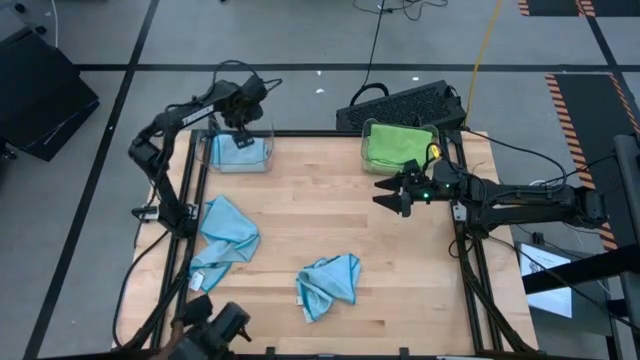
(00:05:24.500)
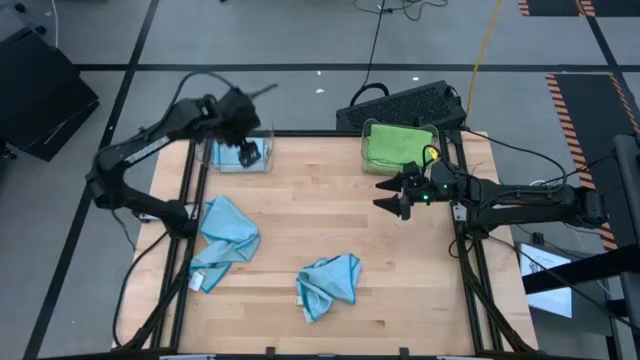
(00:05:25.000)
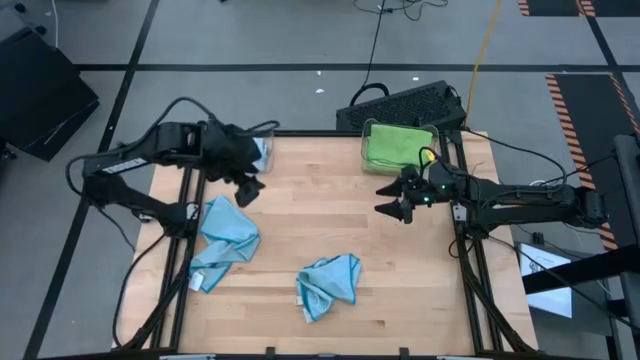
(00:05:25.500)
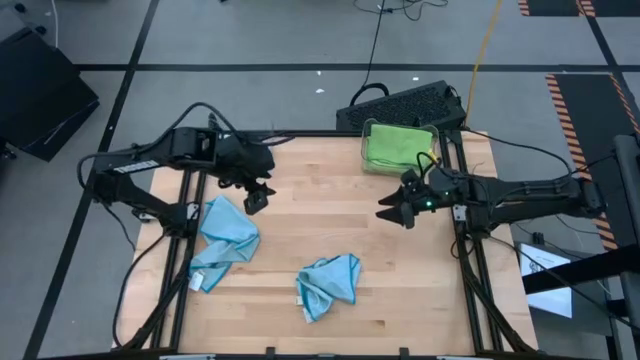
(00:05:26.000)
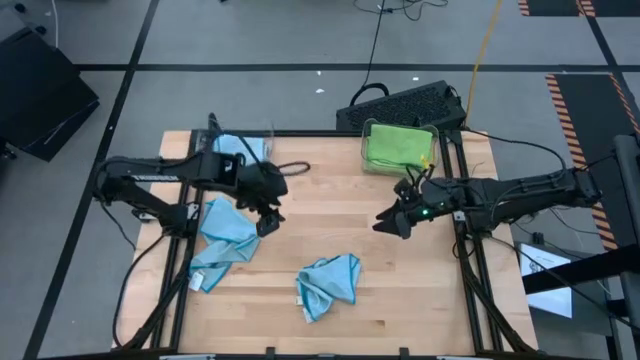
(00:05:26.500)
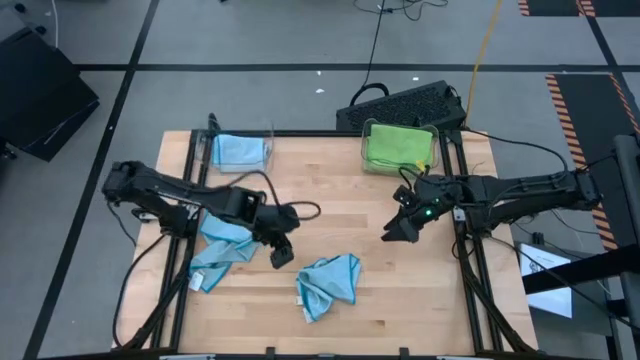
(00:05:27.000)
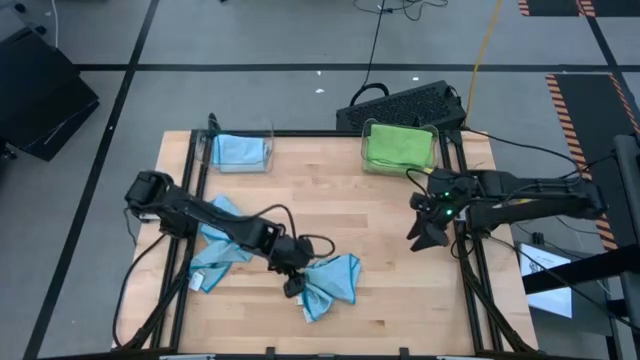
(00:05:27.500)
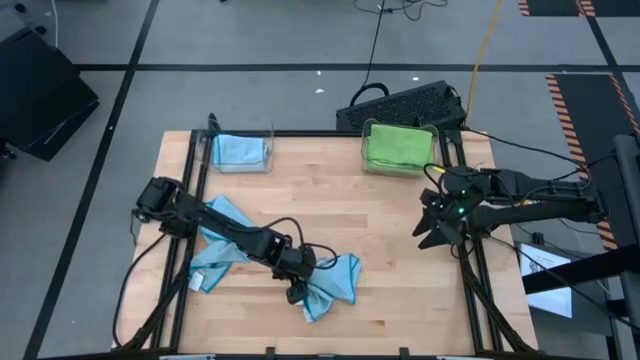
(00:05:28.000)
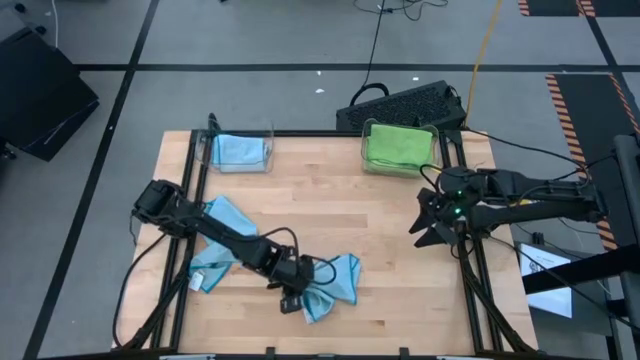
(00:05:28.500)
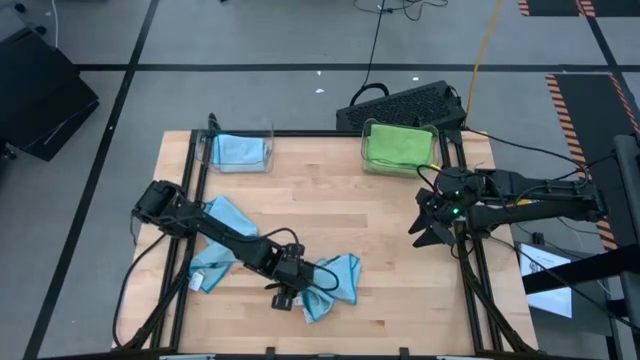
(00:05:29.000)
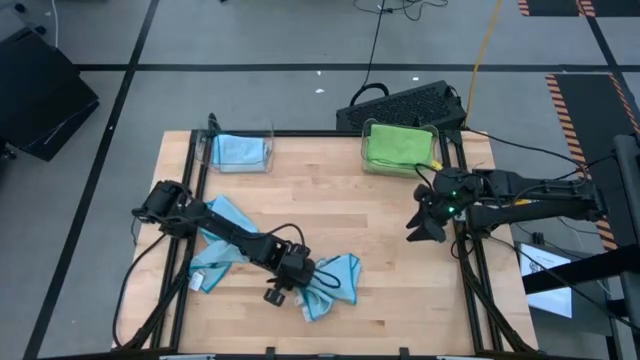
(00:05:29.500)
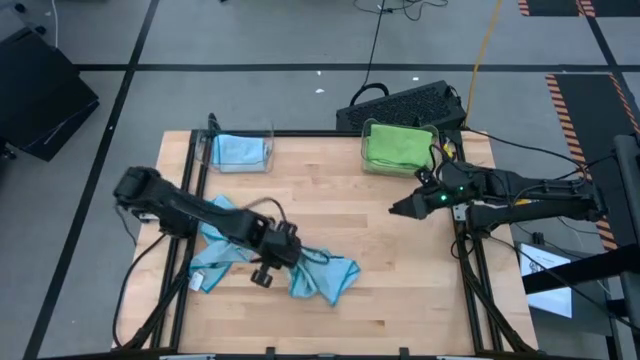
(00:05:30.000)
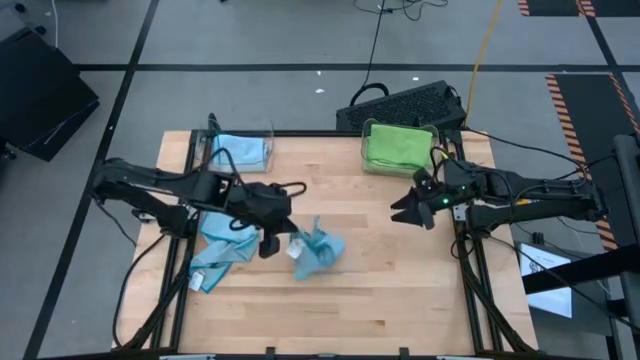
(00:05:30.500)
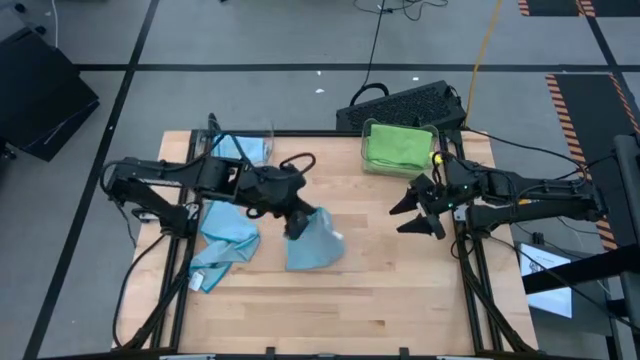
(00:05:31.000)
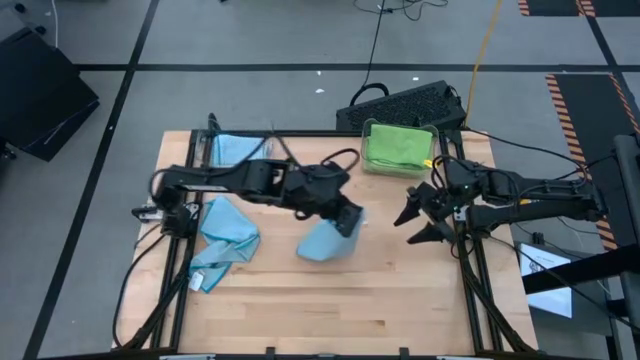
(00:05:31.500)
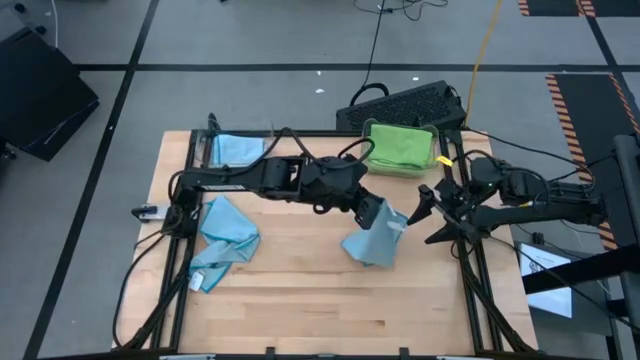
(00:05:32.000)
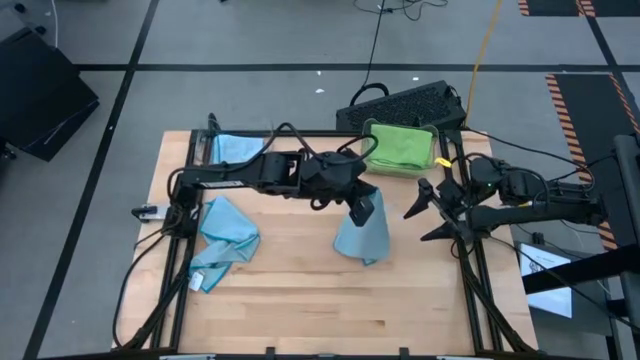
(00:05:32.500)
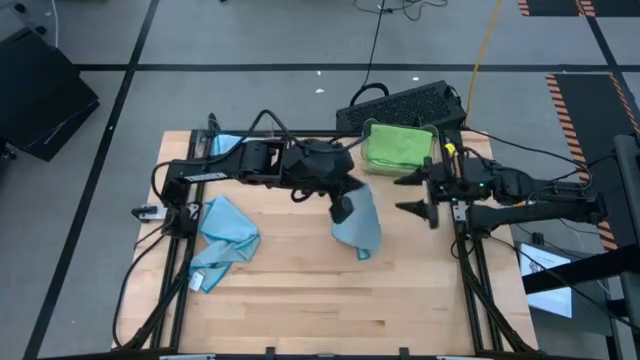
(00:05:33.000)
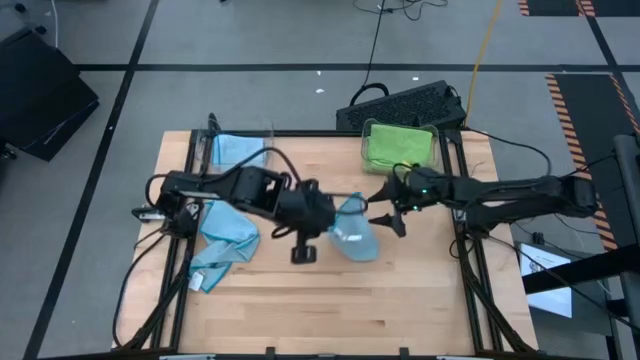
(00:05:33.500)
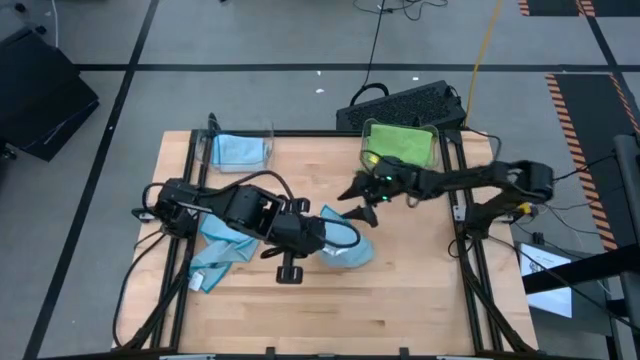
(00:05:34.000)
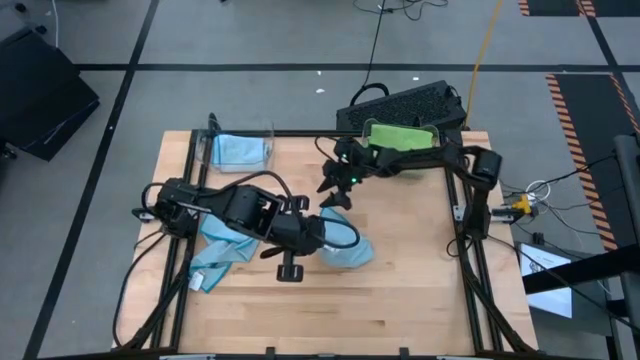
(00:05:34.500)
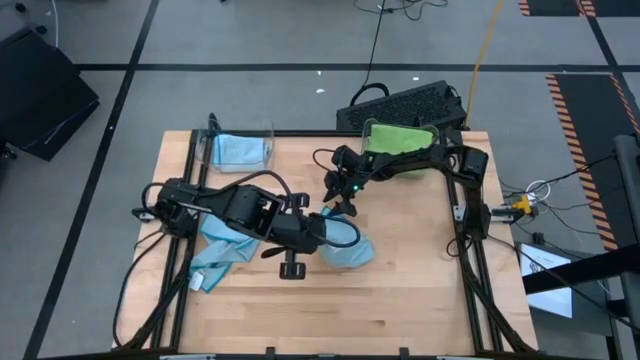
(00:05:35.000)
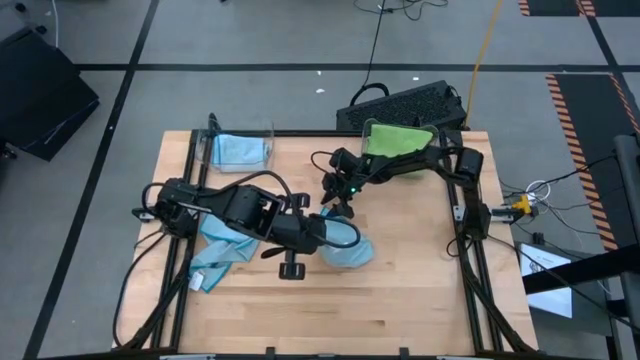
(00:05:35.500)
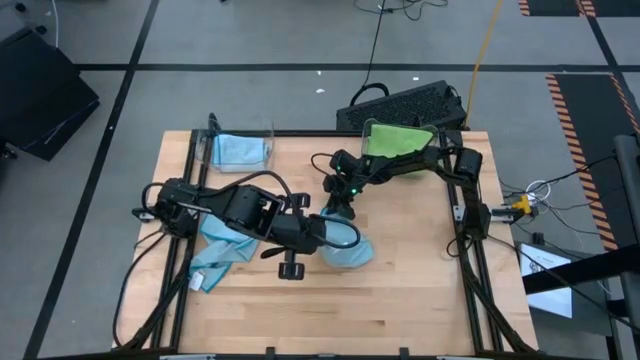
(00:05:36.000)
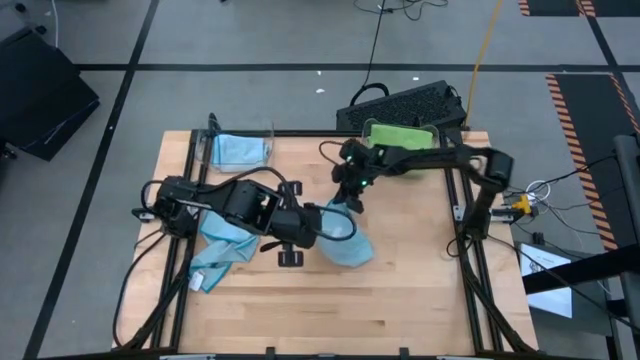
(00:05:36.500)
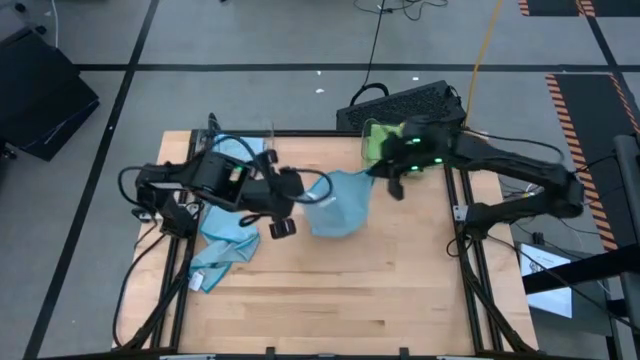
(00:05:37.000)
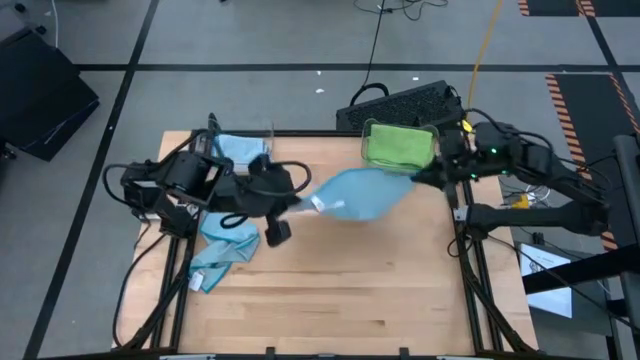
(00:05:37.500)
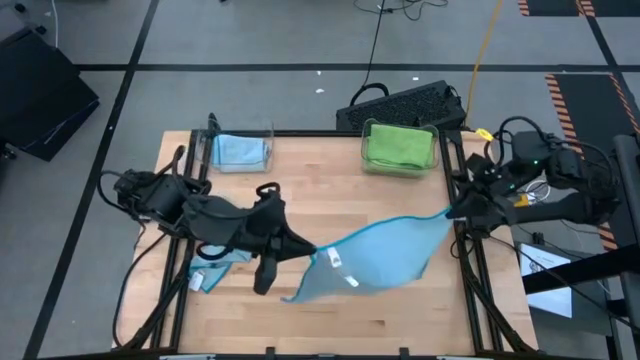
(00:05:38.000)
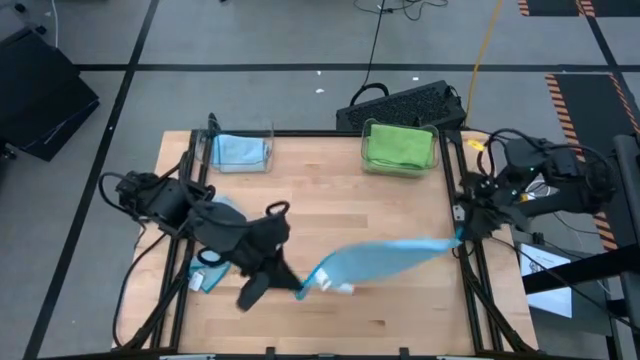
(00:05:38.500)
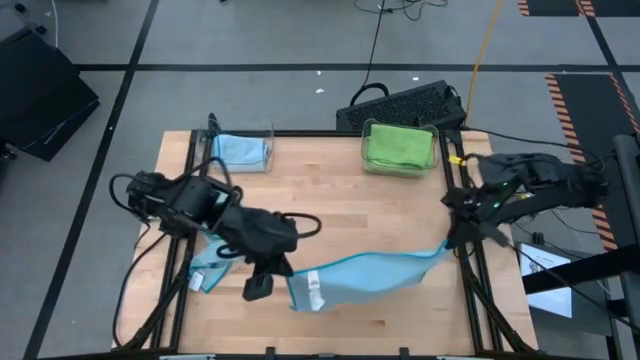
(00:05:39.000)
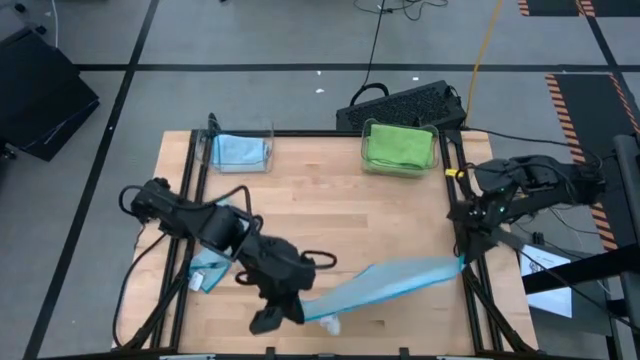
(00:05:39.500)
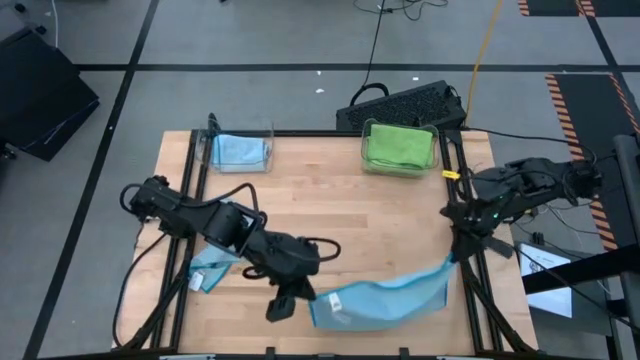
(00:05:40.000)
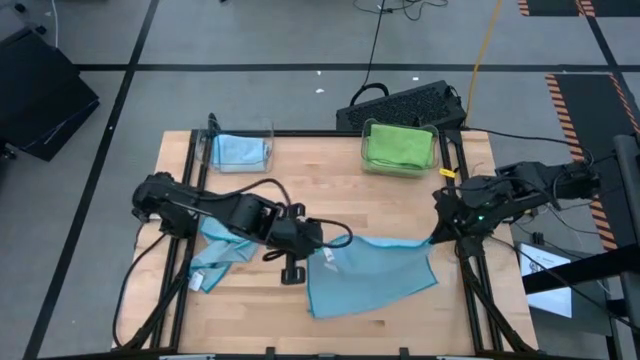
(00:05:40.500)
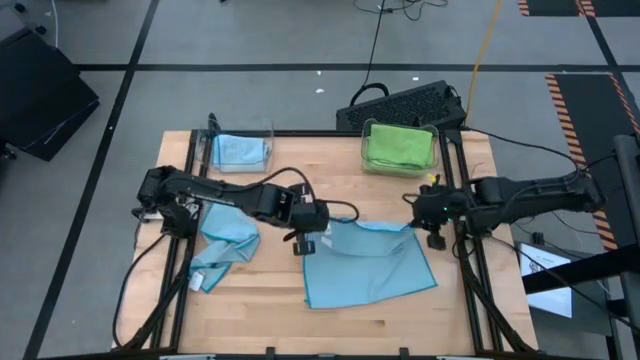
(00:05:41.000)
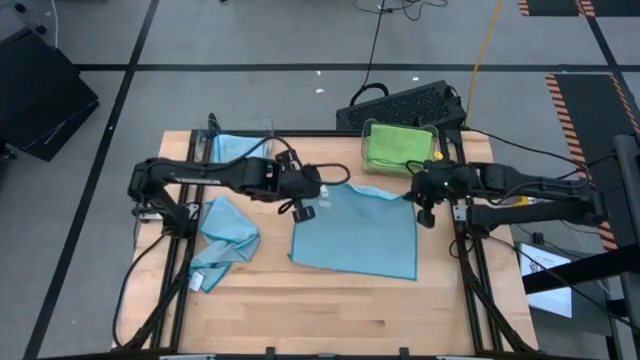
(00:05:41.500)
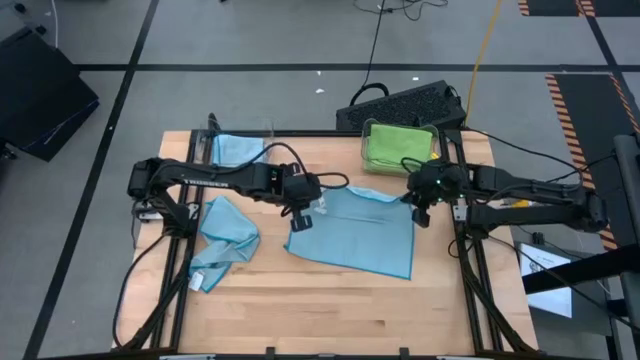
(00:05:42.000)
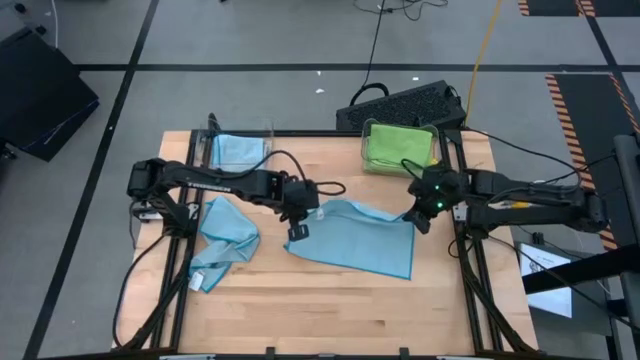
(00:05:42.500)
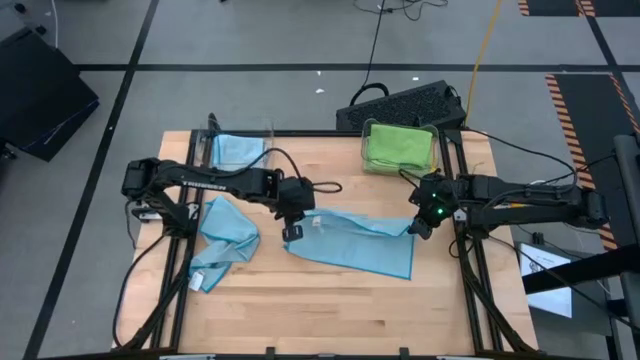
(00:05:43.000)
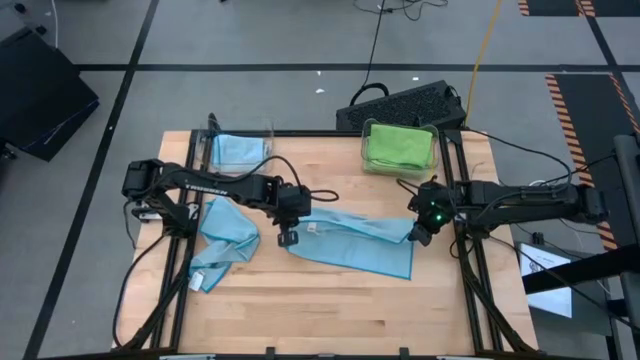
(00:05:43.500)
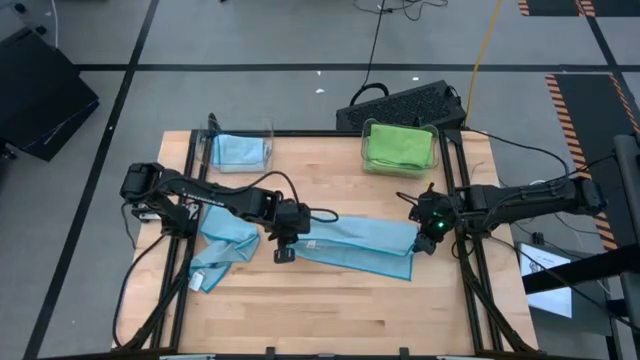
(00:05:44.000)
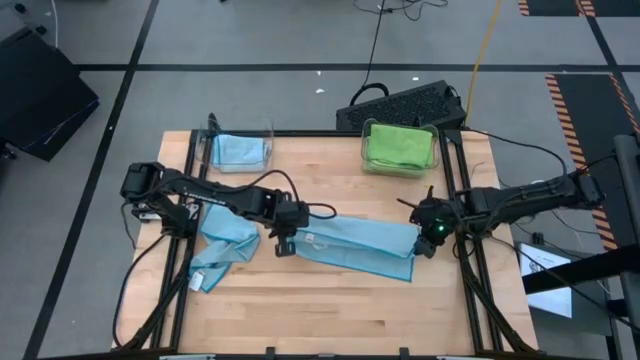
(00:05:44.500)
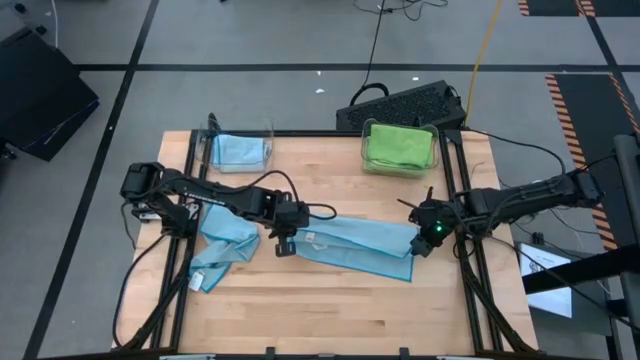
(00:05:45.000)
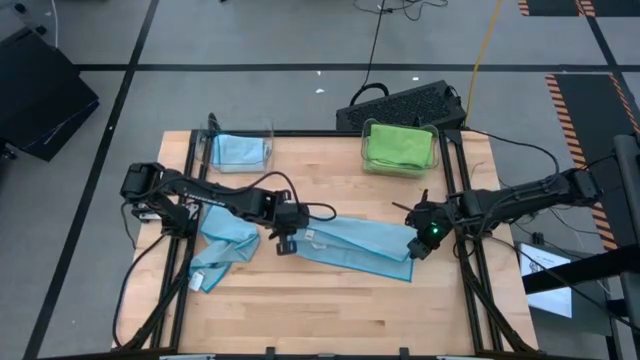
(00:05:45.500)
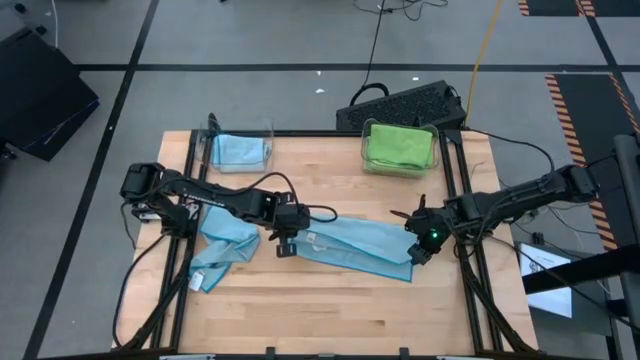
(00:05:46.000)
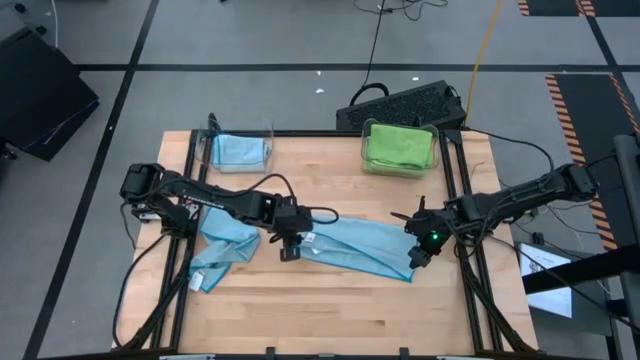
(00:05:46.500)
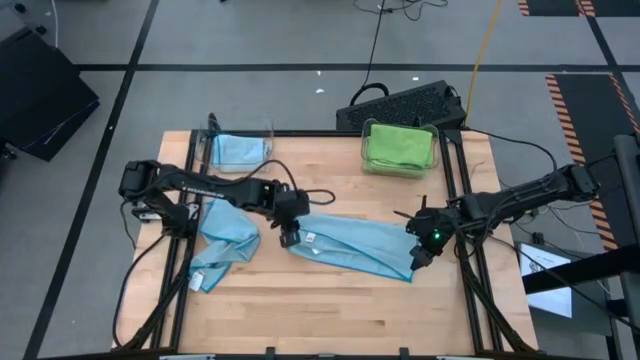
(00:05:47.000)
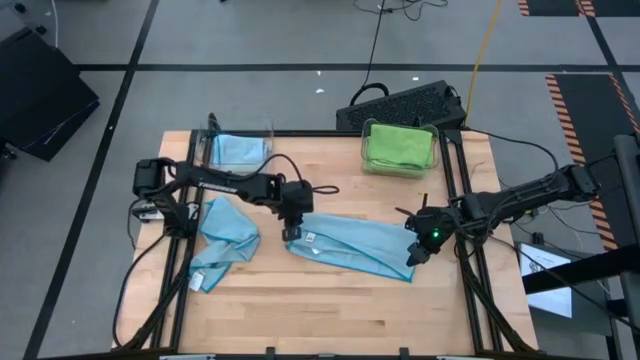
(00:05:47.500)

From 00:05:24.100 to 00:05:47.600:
Task: Sort microfiber towel by color & place in baskets
Fold the right blue towel
